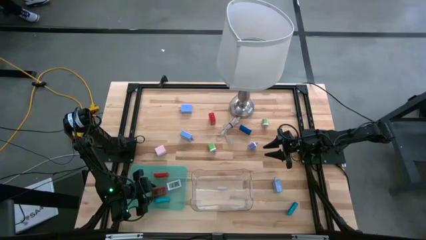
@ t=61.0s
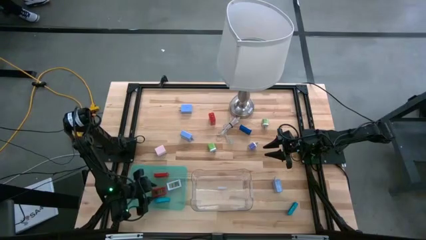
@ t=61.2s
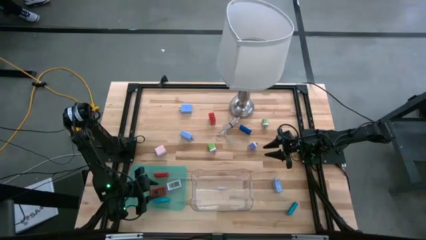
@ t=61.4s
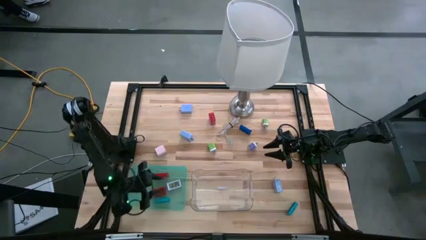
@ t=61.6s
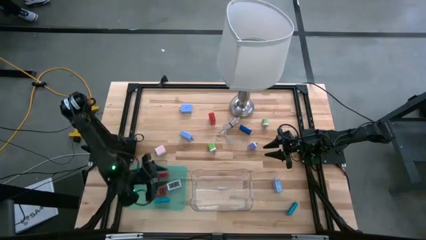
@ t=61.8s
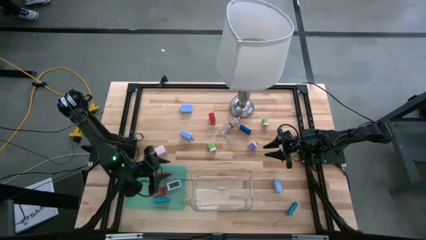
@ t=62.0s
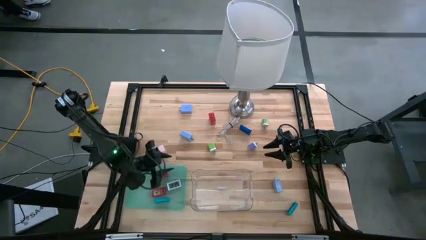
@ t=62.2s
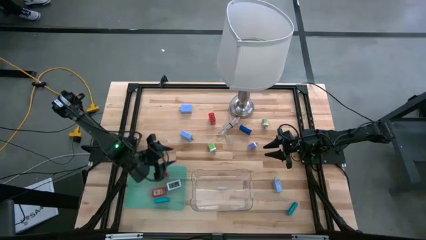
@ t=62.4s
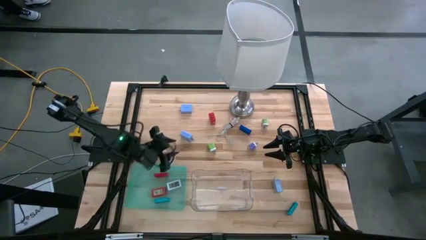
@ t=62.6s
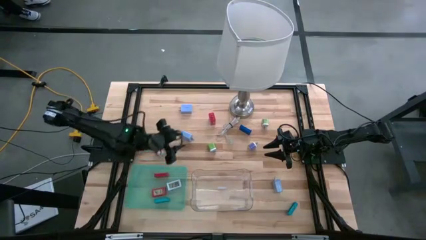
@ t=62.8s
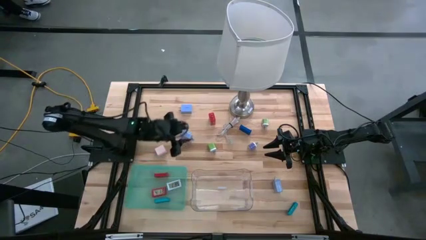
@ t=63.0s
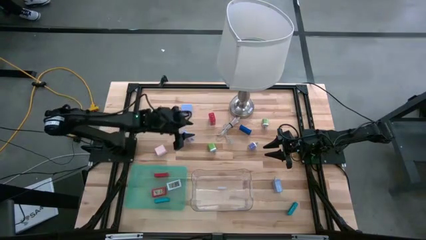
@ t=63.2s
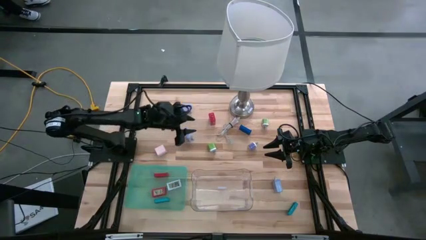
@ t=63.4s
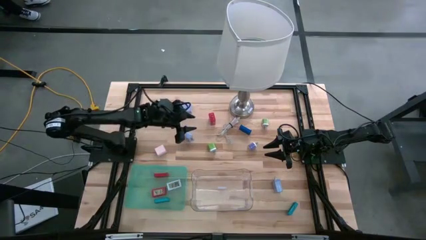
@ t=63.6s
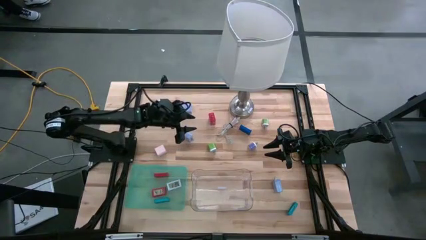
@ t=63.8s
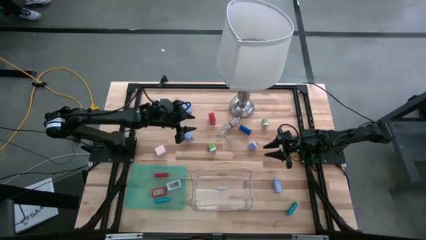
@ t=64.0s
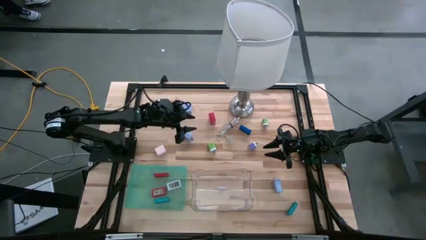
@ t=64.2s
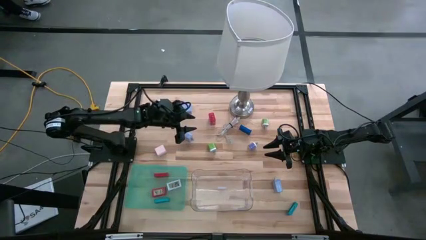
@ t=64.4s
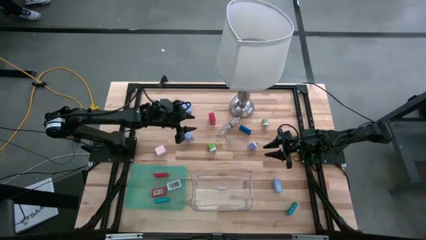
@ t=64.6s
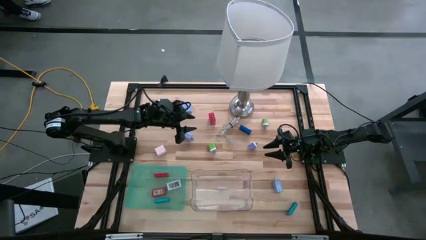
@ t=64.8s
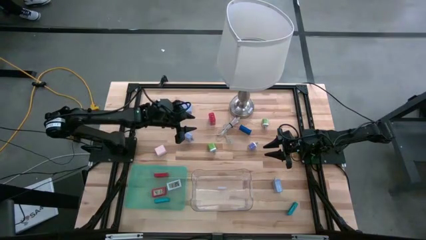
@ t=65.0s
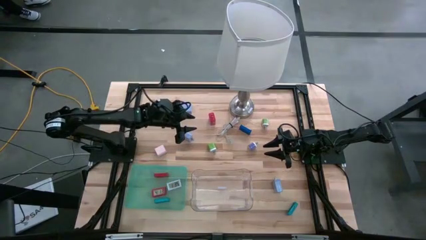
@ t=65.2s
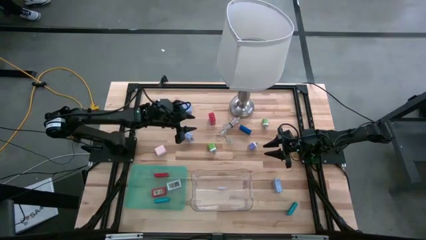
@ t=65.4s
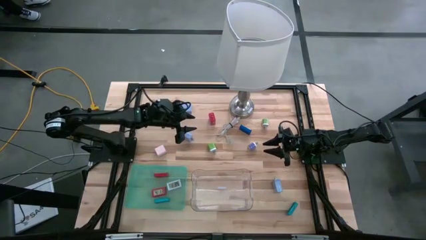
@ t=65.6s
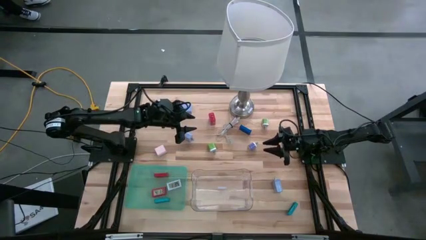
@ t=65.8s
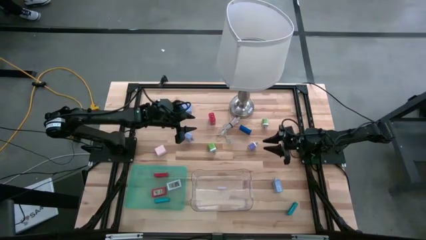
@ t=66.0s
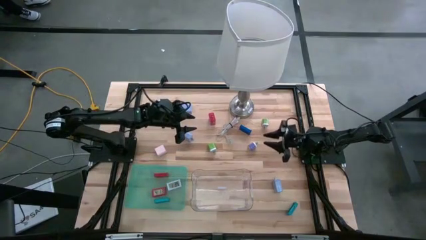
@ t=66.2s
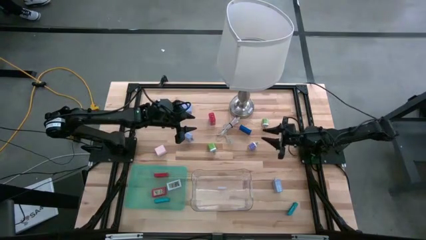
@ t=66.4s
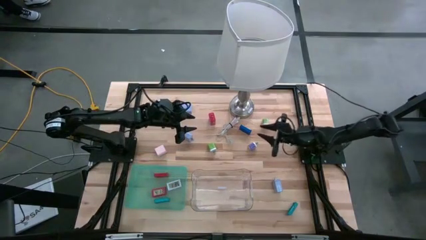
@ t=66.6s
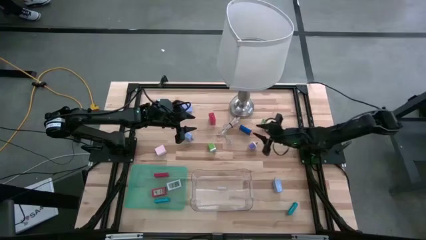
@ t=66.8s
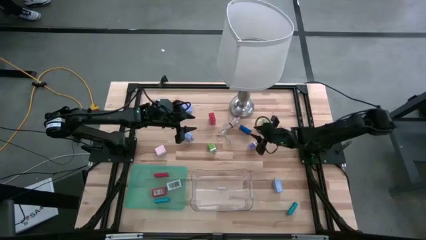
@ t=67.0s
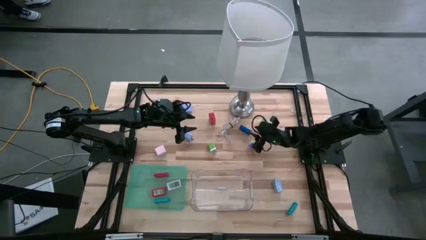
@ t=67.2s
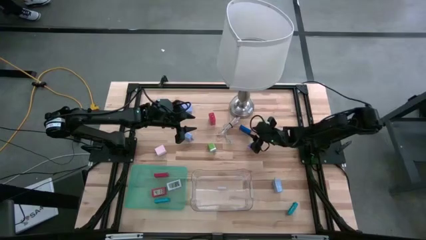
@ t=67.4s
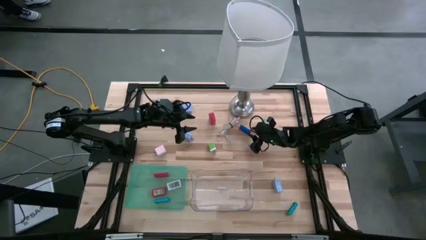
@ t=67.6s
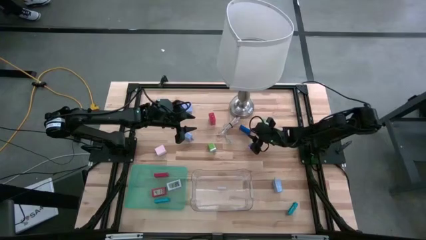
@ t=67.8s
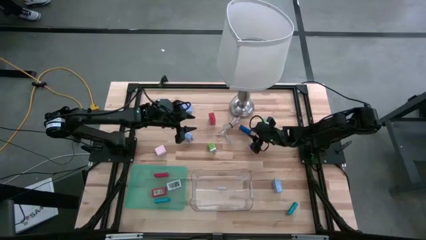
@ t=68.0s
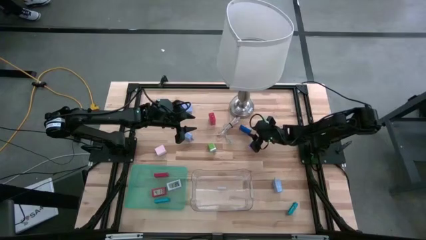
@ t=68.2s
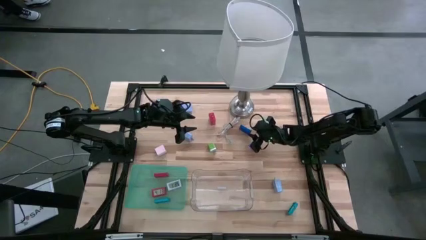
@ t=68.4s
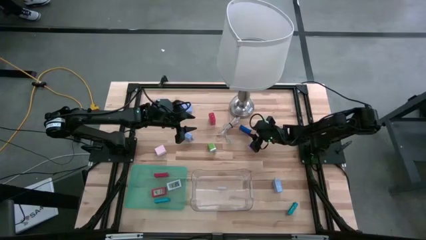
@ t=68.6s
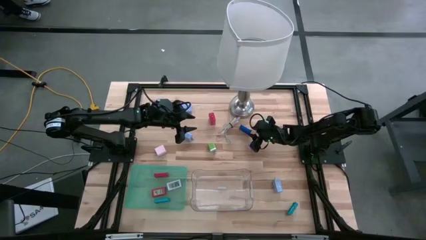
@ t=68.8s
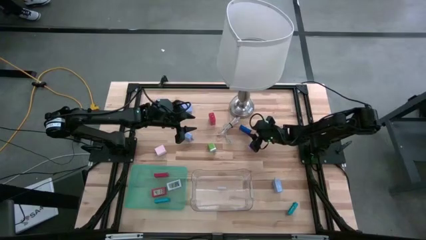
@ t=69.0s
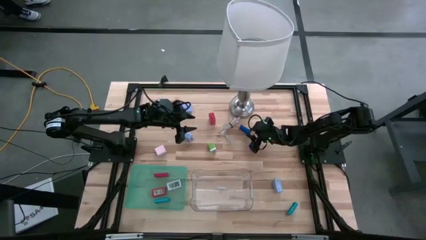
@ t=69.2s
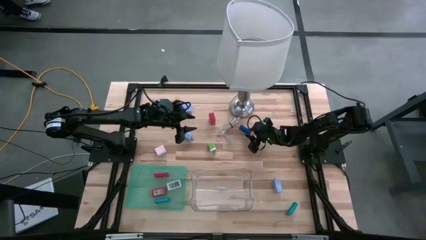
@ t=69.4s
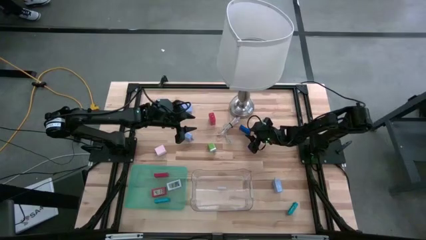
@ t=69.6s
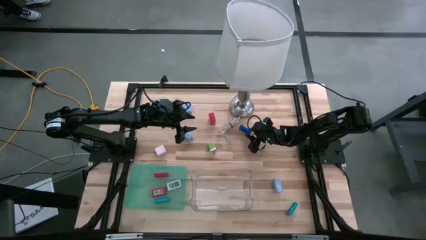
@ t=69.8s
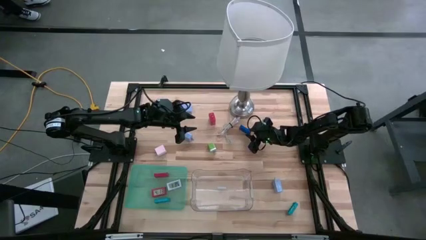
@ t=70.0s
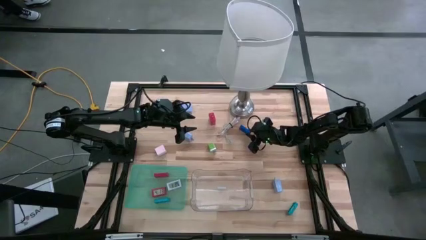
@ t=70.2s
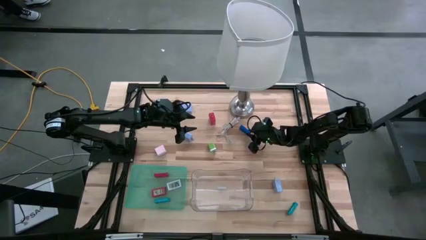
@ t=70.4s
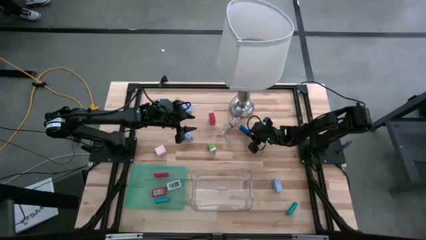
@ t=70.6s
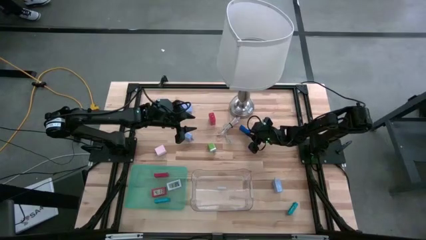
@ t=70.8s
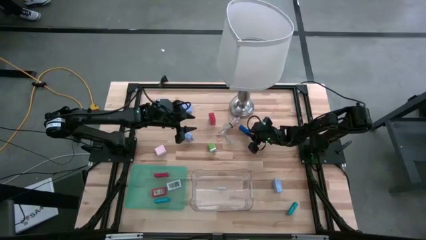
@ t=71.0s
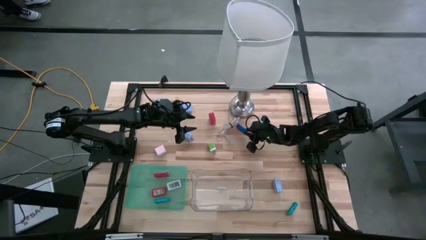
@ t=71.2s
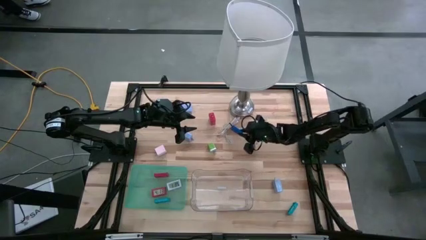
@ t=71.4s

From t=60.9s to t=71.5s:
Task: Pick & Place Office items
Put the blue timer into the green bin

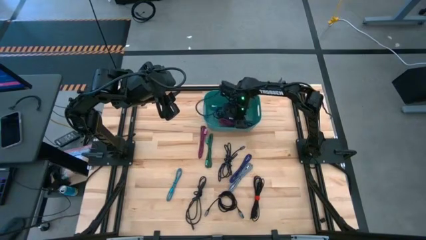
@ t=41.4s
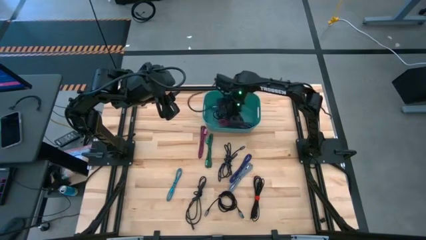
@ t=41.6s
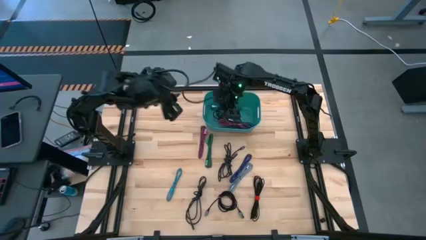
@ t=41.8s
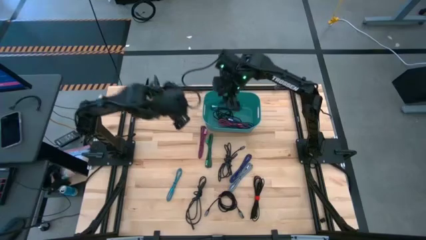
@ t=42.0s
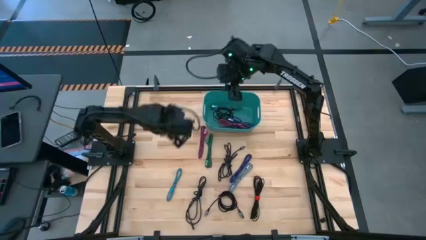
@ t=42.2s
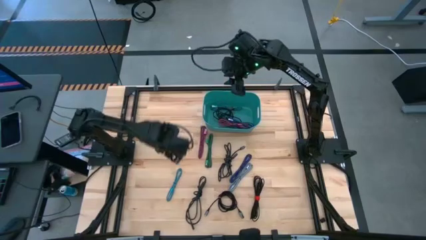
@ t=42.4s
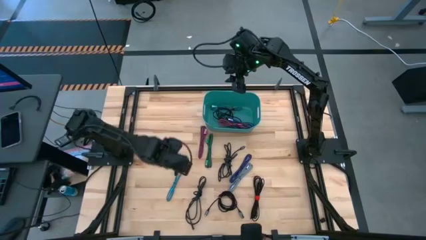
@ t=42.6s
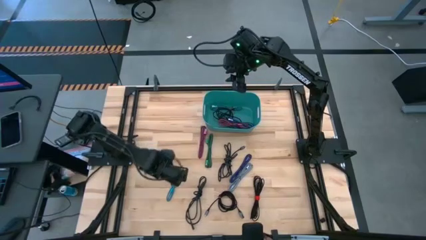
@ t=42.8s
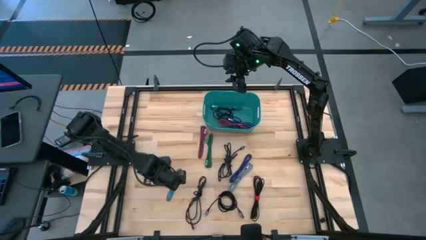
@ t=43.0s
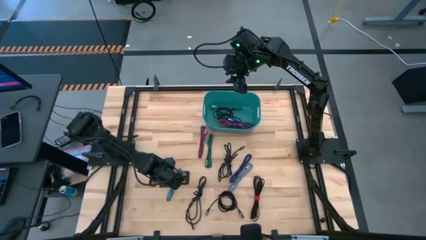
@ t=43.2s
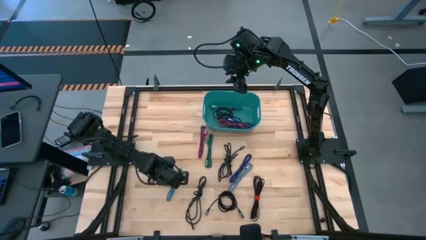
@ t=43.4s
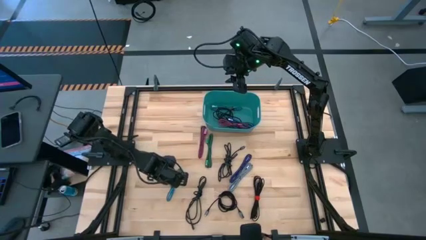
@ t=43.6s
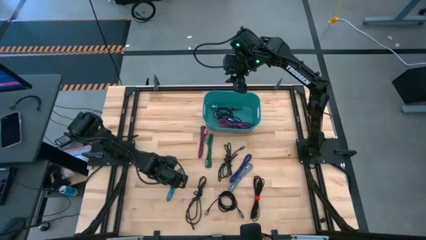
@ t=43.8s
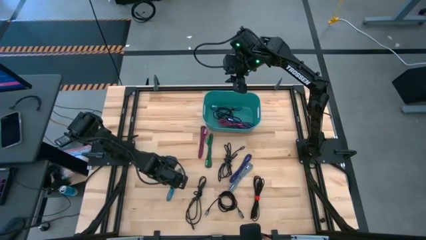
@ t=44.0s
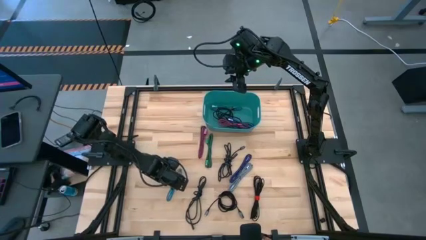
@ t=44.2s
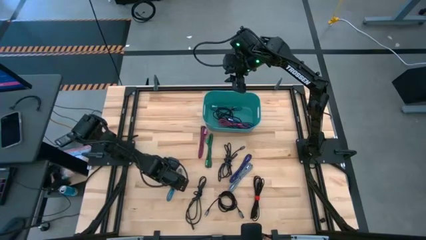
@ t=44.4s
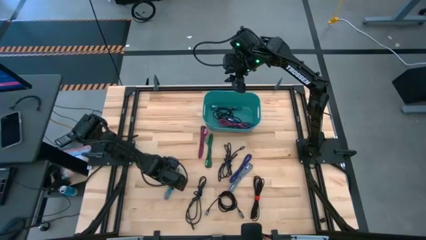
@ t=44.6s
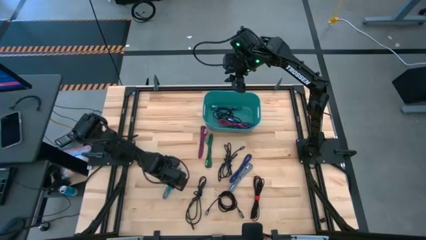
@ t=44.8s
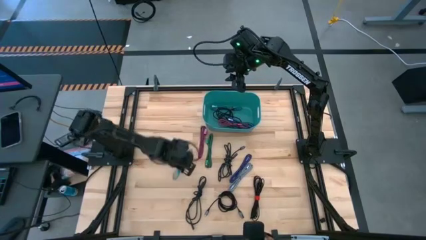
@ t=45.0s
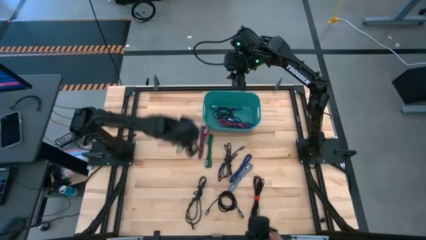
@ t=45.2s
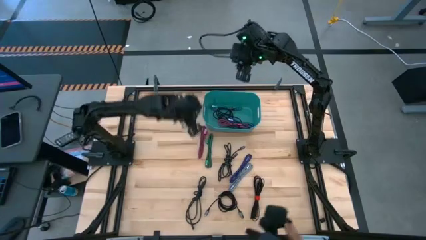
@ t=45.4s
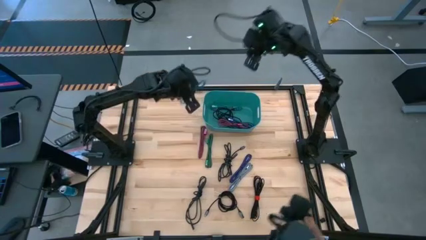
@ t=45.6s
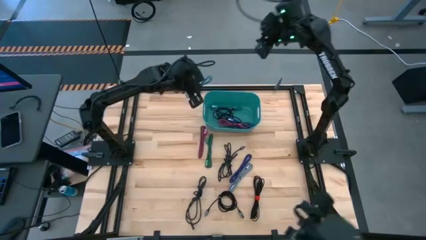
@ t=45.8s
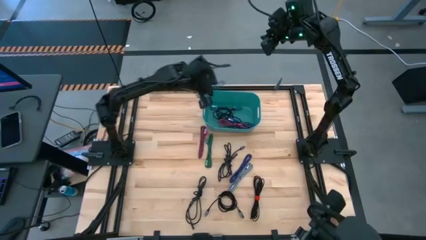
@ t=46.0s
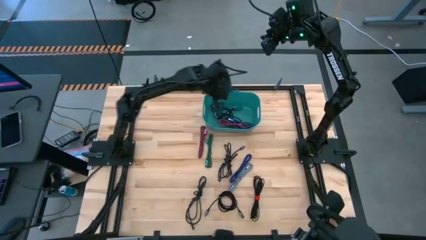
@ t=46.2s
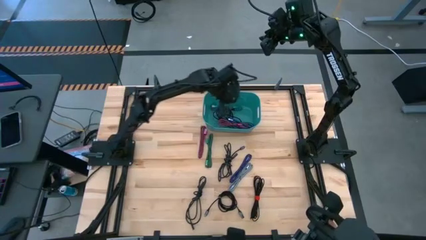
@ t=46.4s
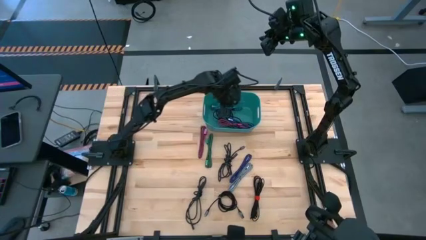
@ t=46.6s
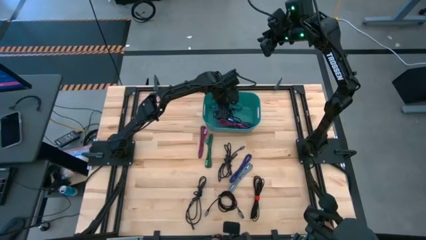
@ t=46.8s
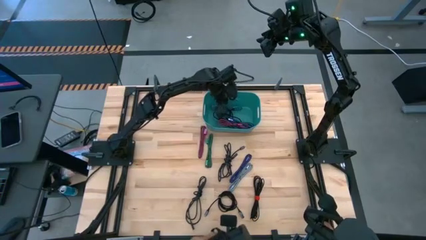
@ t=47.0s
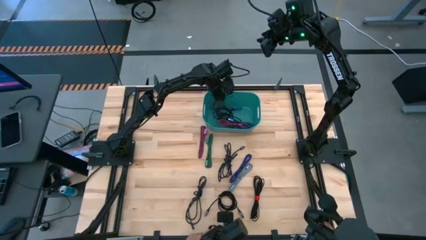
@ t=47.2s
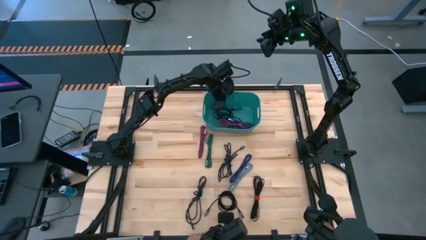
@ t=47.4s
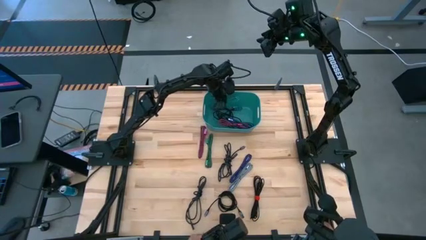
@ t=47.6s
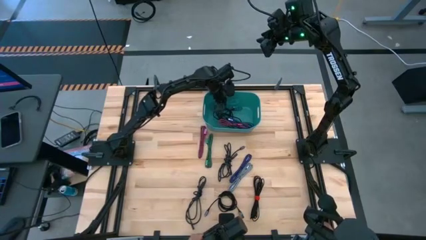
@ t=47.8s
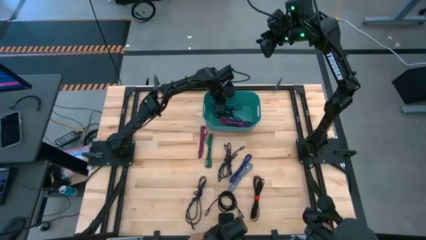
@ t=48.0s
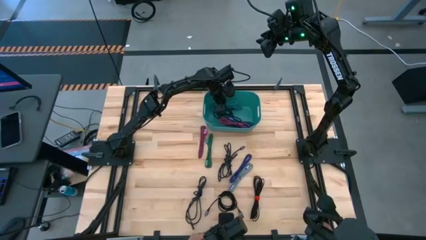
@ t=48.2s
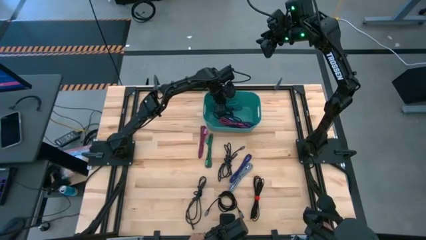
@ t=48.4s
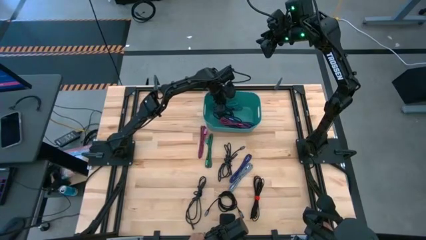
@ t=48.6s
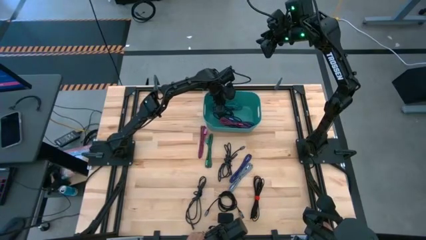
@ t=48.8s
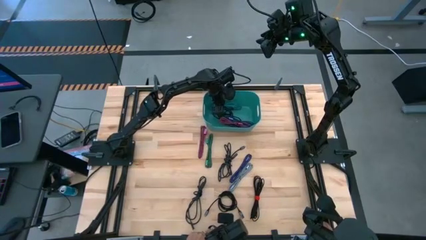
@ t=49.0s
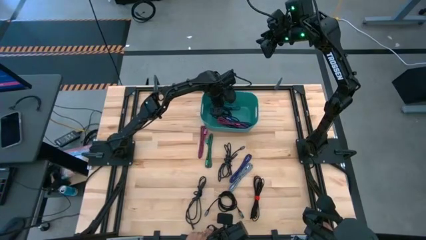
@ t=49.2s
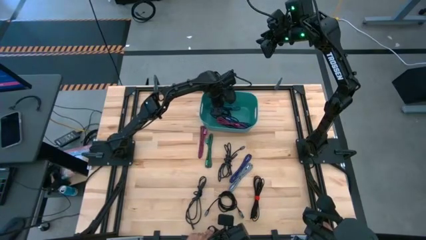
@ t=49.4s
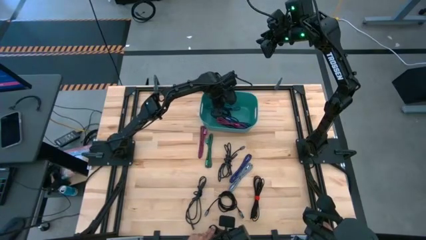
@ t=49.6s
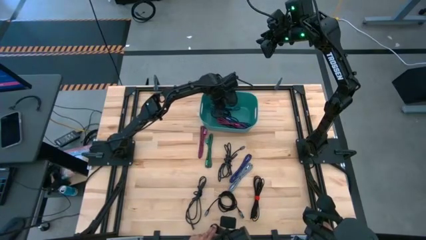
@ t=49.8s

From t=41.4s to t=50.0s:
Task: Pick and place USB-C Cables
Put the blue charger cable into the green bin
